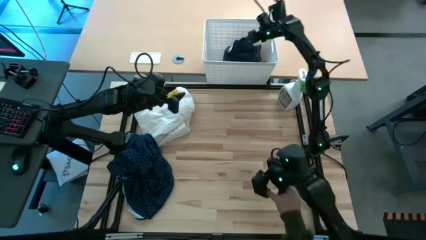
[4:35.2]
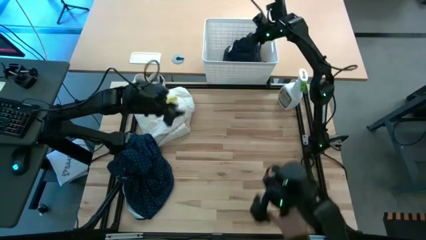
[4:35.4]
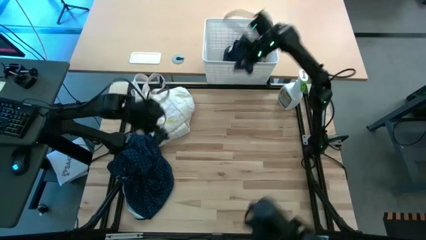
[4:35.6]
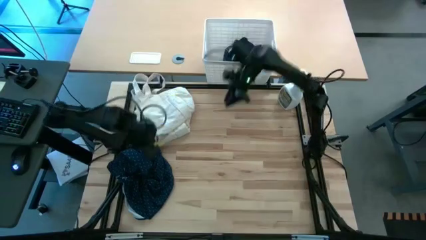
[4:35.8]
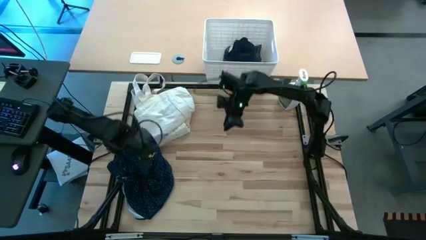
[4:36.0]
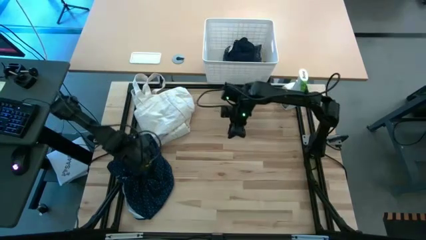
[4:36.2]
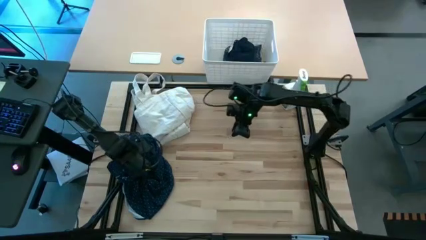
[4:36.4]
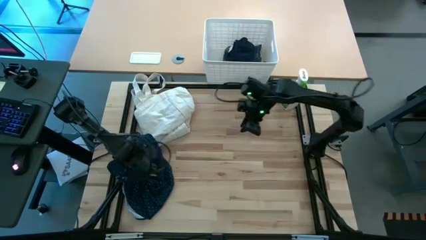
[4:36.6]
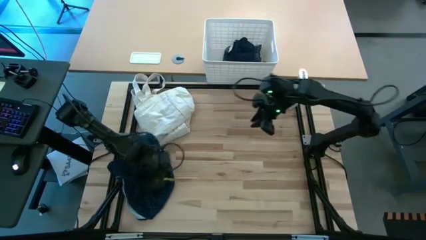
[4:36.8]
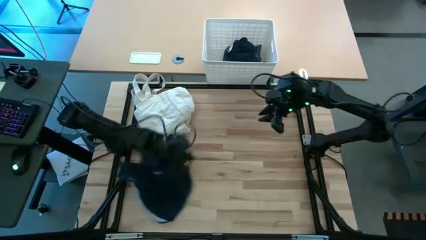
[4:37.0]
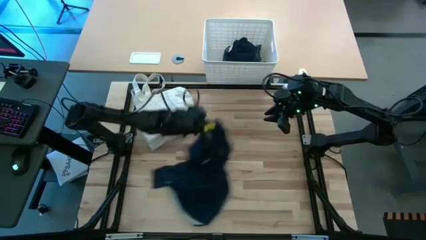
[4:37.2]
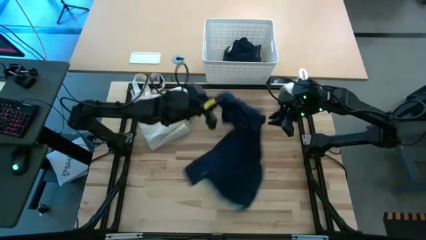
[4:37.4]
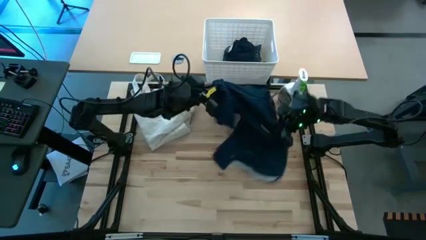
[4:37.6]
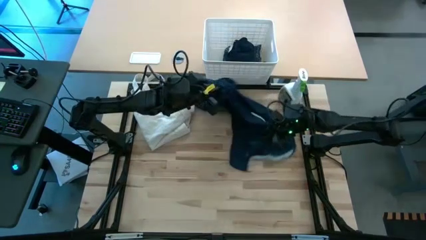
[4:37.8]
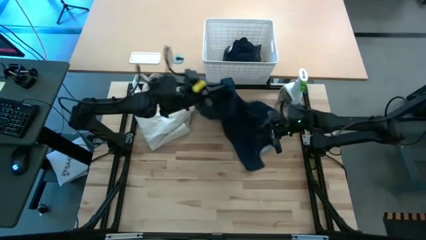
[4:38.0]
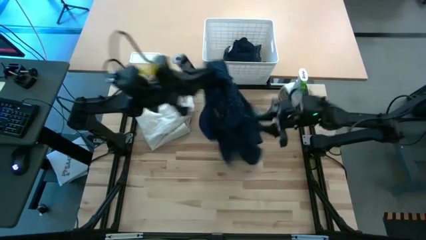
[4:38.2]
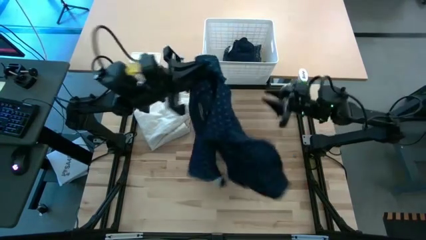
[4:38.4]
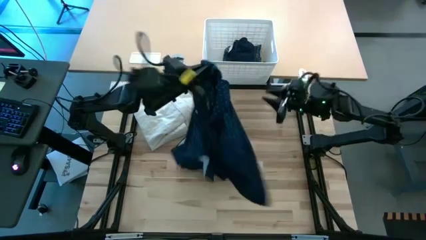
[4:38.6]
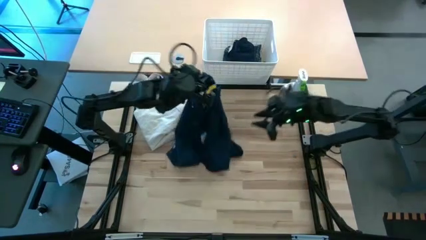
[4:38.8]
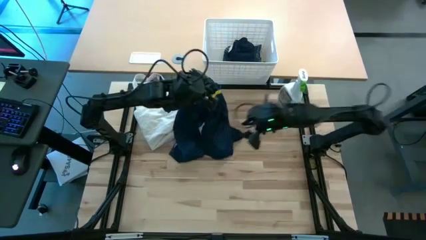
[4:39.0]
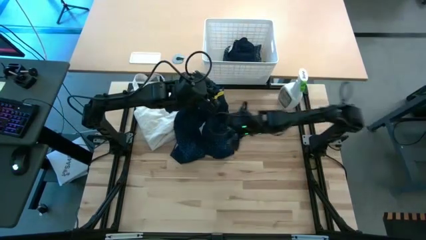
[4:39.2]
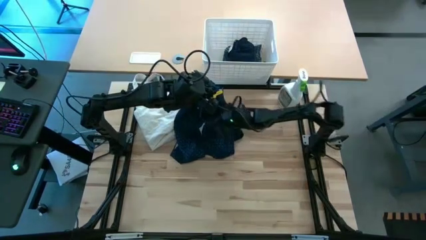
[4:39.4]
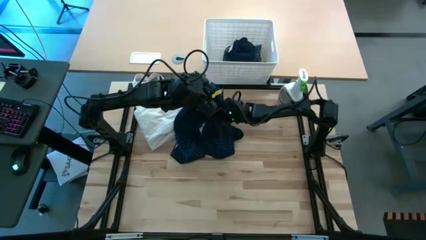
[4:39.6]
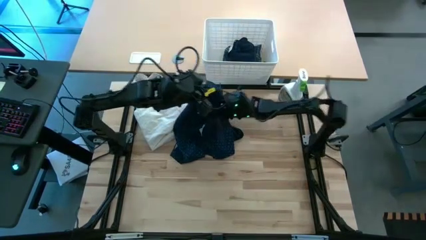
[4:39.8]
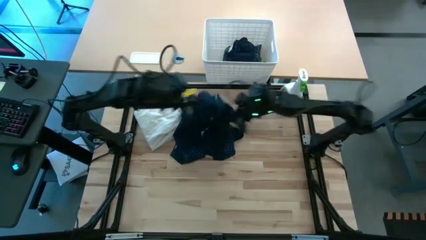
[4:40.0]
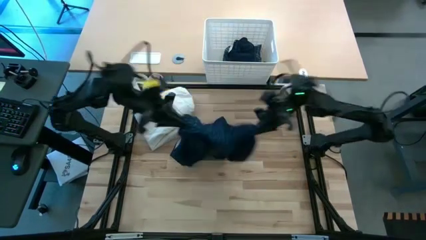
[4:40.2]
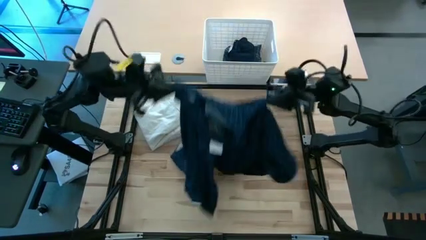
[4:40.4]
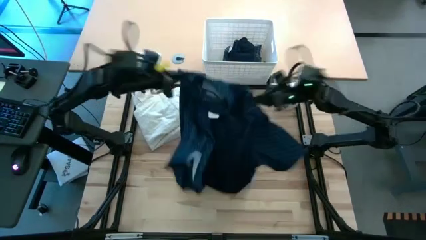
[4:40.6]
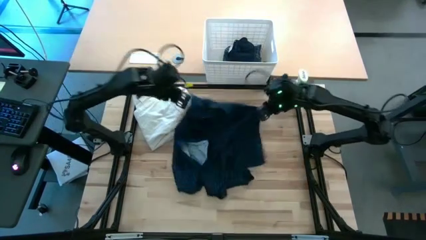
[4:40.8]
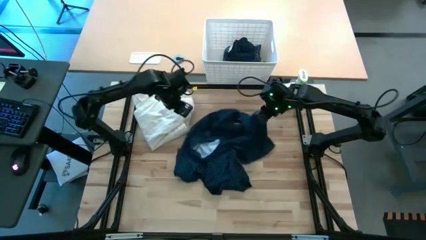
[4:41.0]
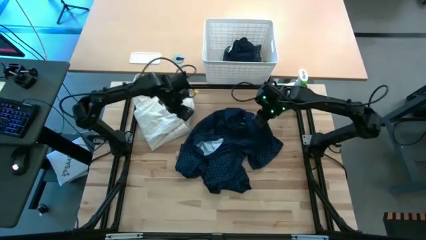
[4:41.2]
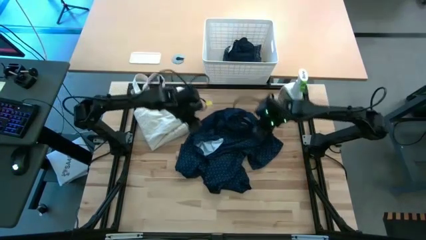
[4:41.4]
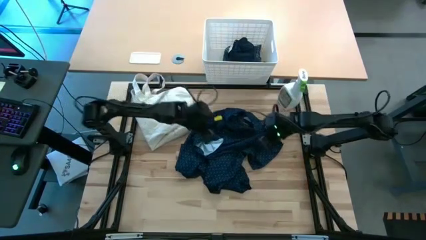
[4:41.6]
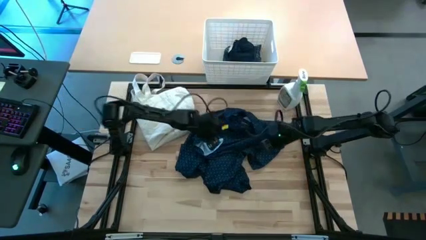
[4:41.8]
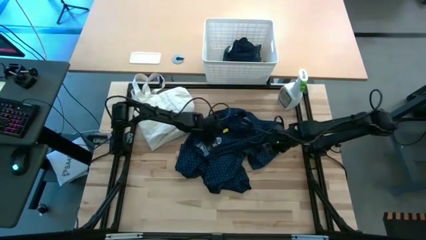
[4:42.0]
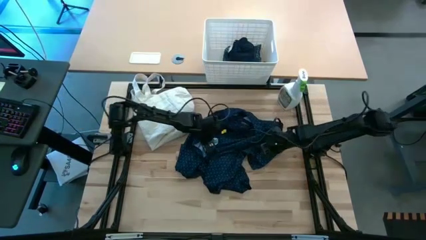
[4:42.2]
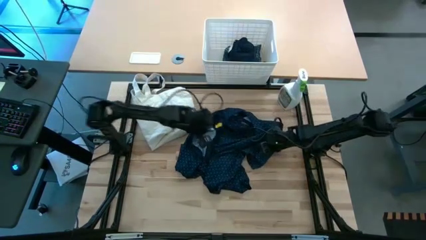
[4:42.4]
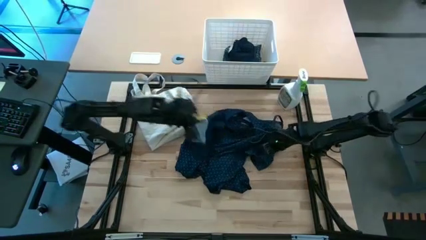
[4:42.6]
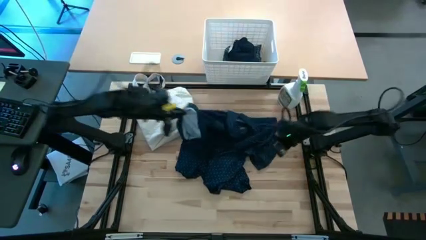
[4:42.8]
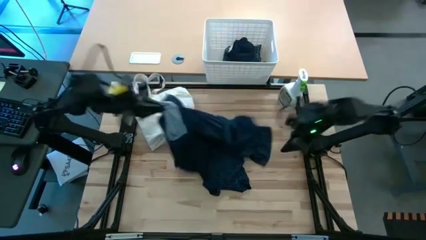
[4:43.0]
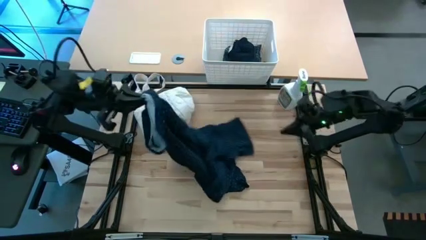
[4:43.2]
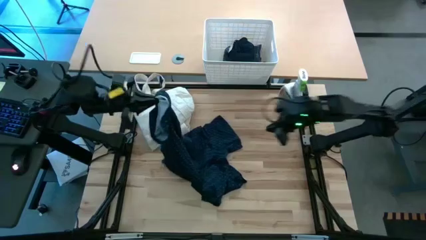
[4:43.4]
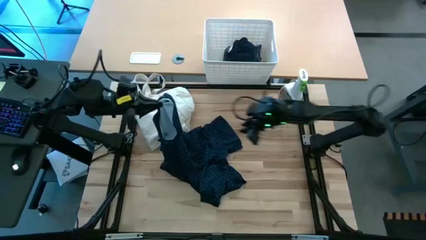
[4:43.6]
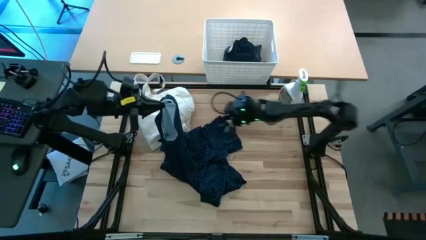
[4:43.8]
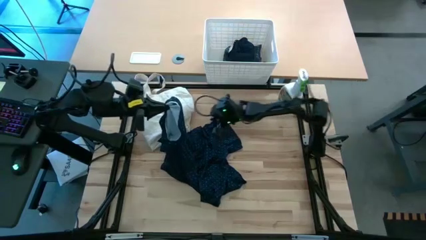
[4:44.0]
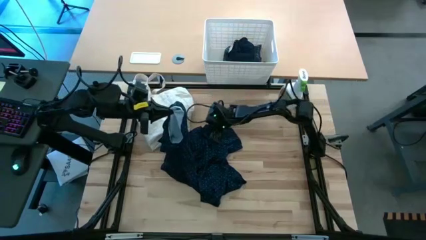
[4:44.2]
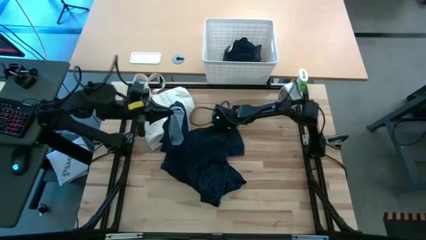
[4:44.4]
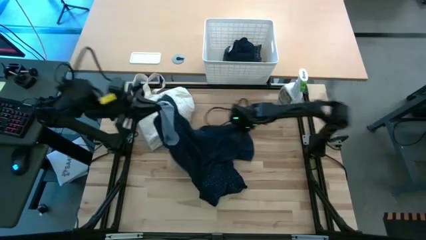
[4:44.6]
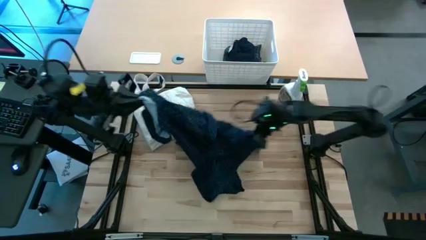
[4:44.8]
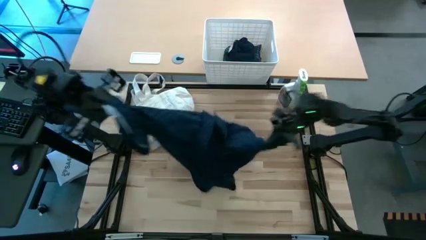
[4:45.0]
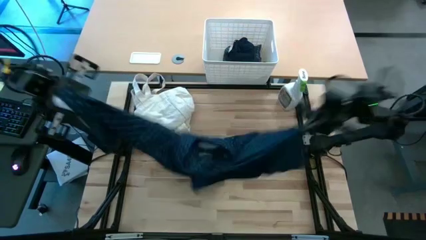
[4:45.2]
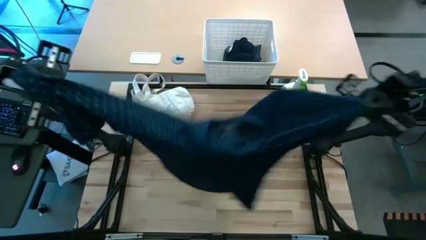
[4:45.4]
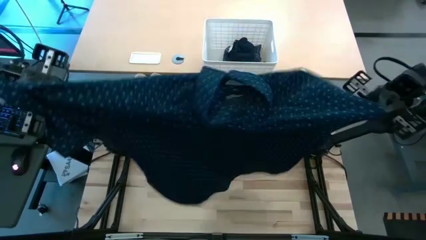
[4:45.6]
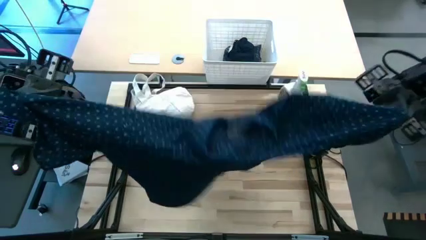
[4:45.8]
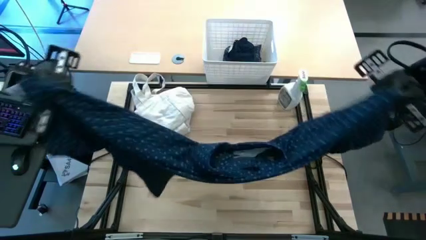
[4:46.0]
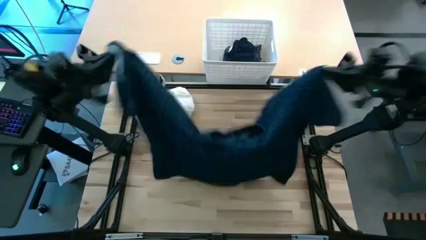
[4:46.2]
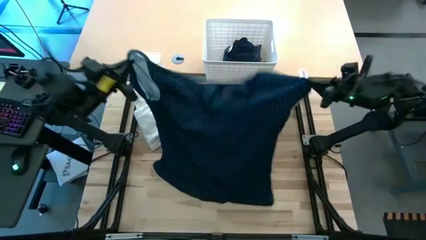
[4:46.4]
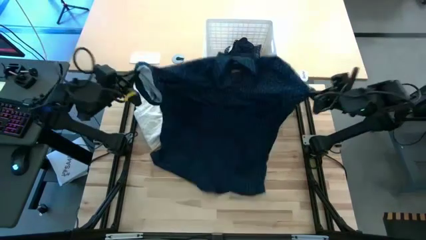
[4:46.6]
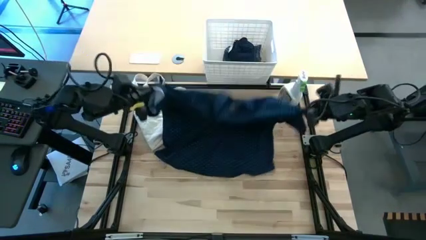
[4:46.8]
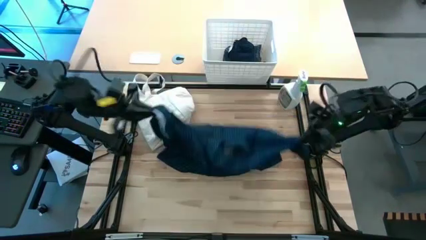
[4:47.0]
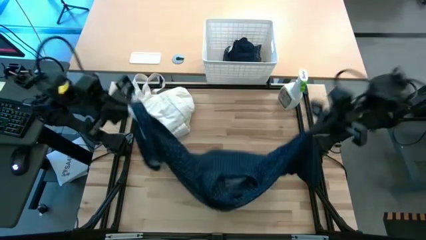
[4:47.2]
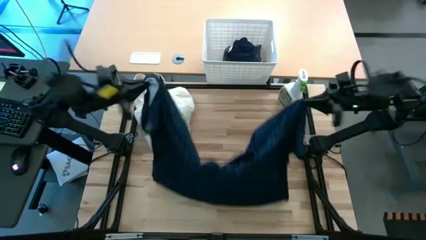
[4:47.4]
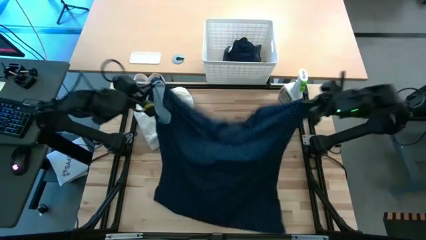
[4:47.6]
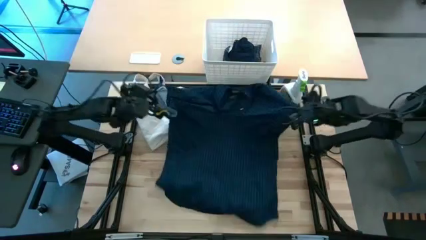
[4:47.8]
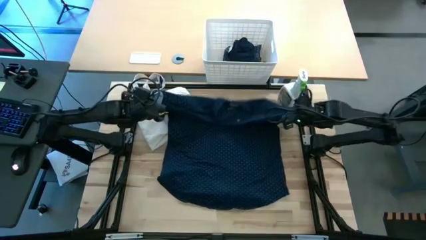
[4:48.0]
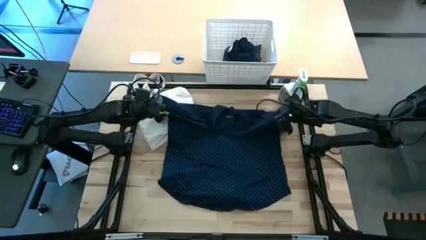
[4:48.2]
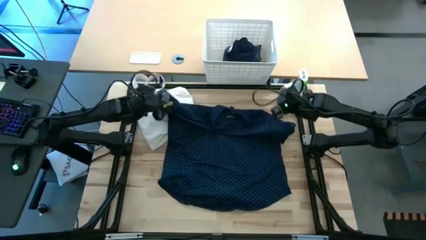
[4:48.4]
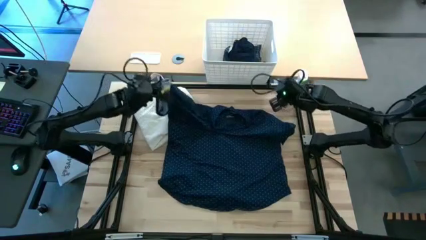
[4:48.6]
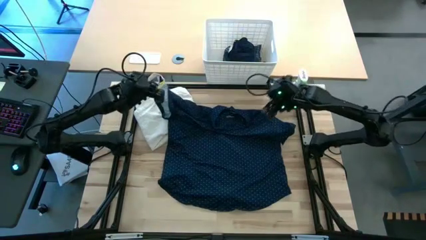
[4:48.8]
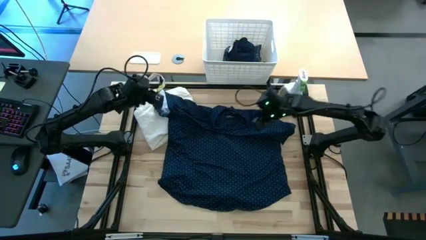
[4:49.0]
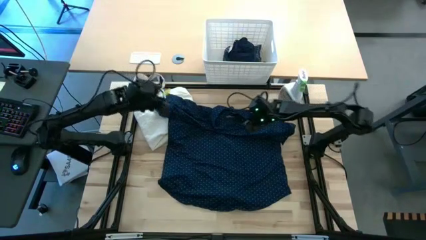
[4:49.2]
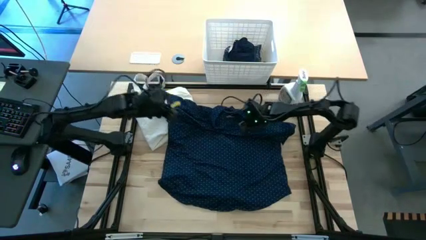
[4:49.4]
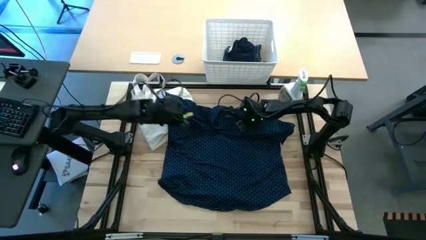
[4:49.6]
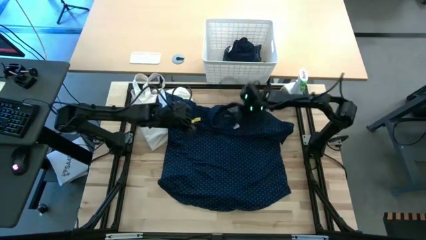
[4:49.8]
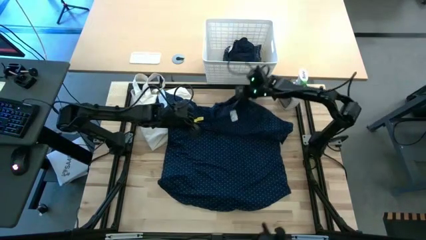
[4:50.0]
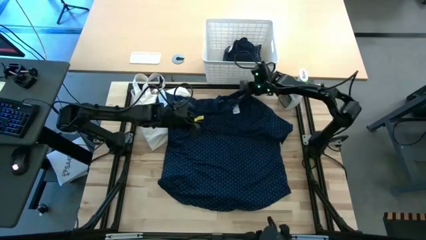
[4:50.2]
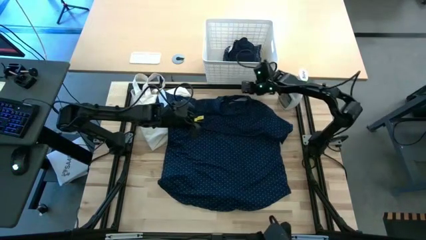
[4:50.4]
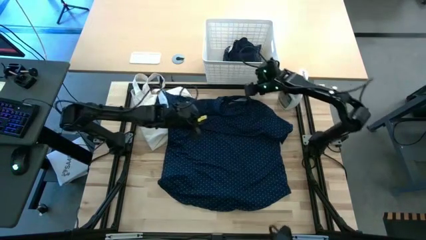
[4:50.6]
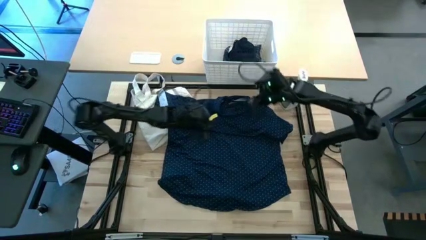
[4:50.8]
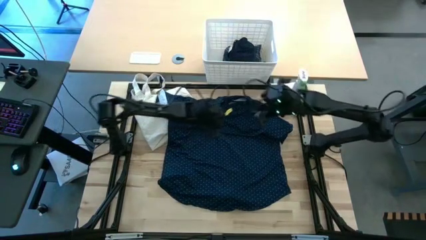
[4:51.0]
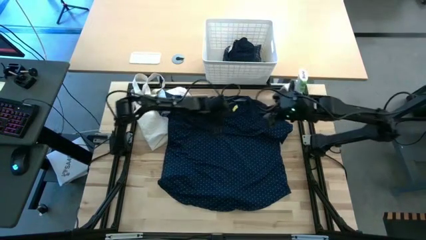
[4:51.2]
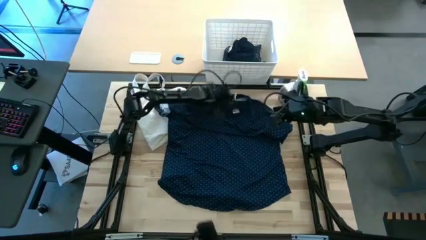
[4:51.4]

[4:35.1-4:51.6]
Fold the blue polo shirt
